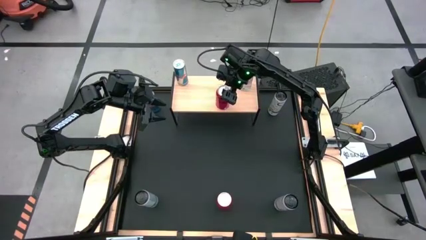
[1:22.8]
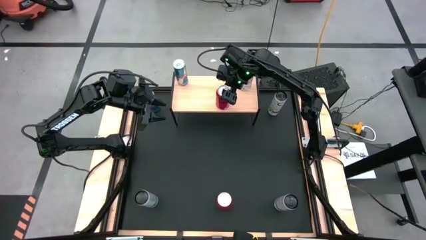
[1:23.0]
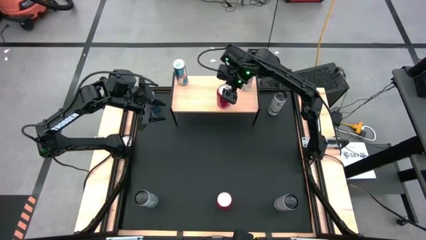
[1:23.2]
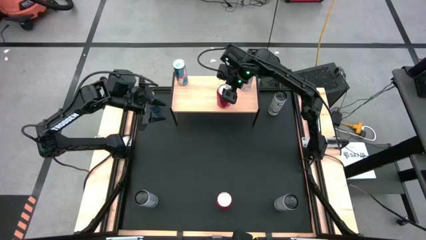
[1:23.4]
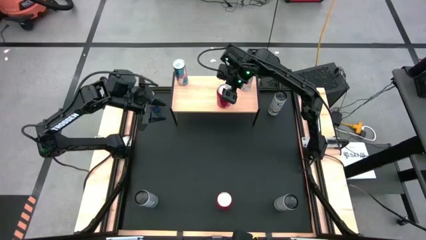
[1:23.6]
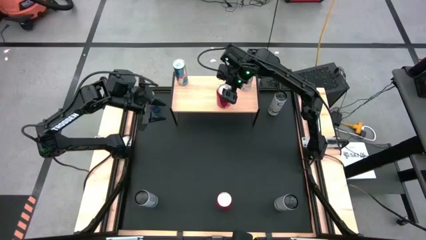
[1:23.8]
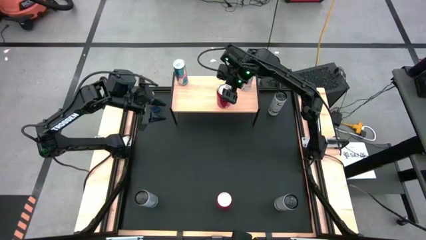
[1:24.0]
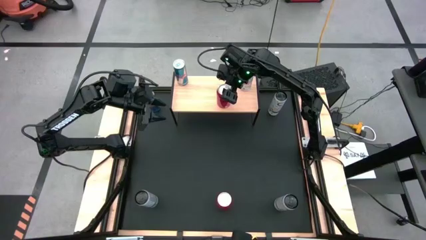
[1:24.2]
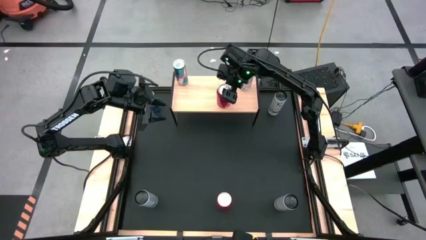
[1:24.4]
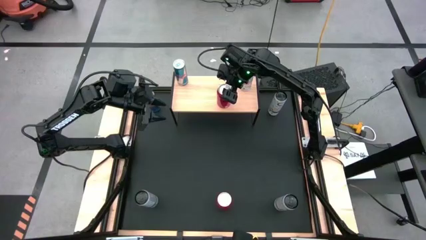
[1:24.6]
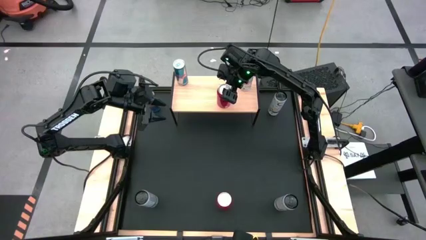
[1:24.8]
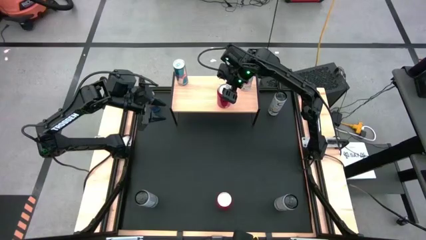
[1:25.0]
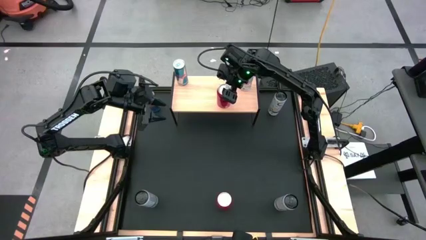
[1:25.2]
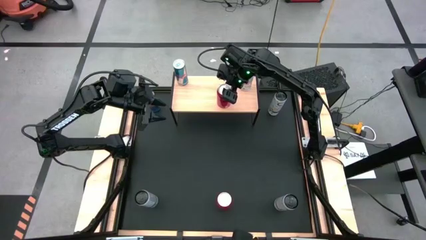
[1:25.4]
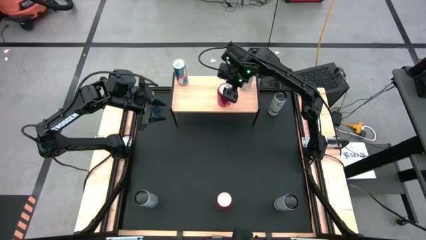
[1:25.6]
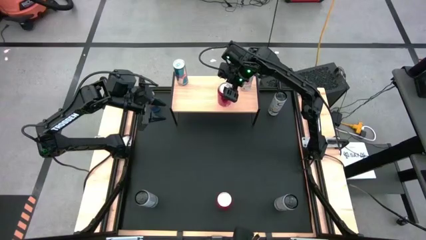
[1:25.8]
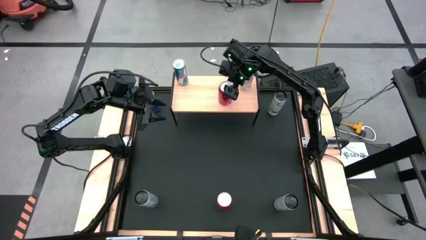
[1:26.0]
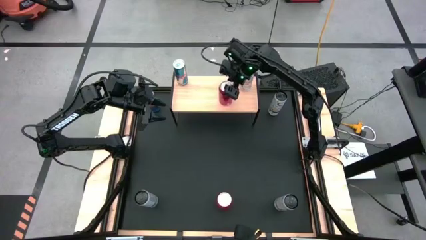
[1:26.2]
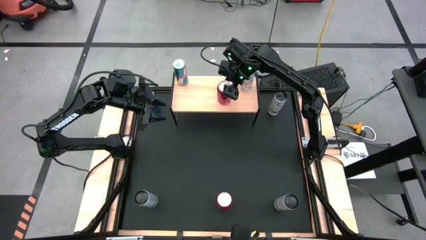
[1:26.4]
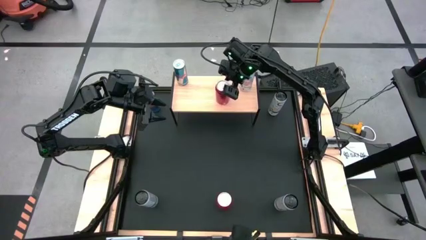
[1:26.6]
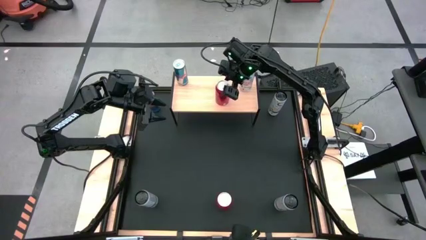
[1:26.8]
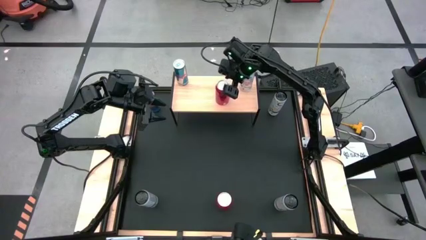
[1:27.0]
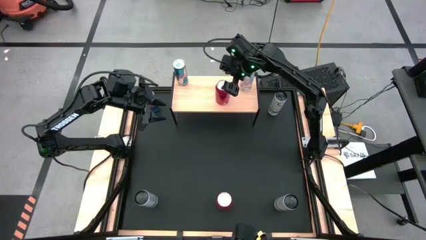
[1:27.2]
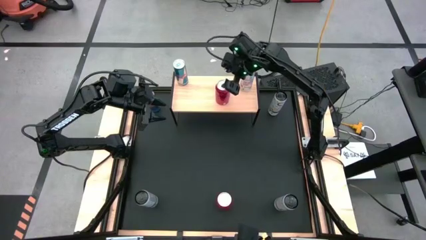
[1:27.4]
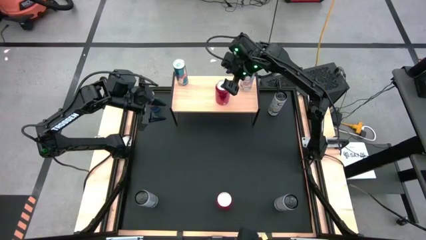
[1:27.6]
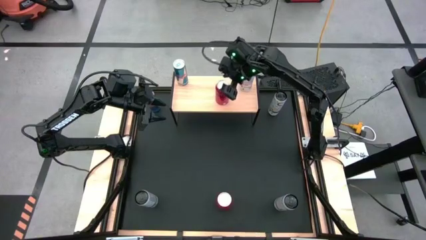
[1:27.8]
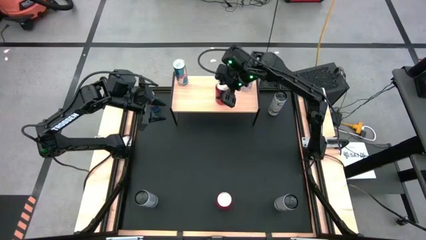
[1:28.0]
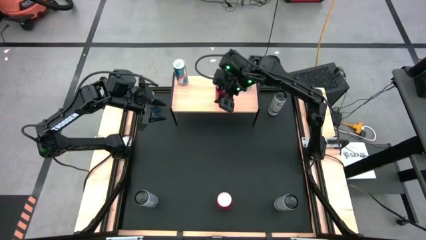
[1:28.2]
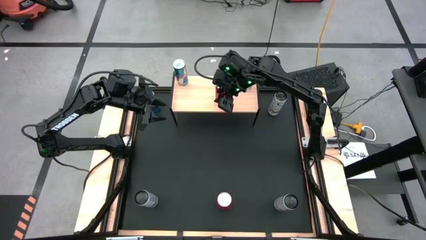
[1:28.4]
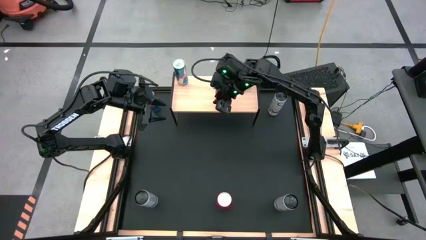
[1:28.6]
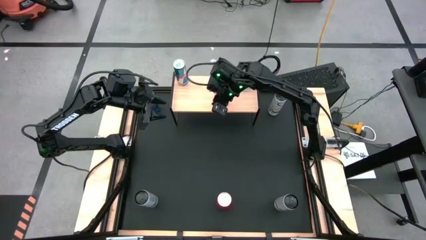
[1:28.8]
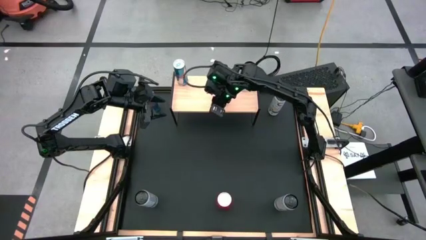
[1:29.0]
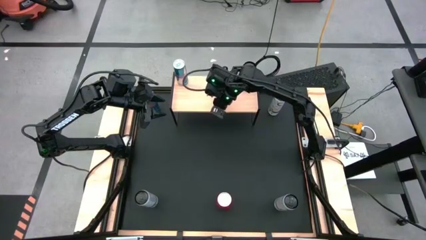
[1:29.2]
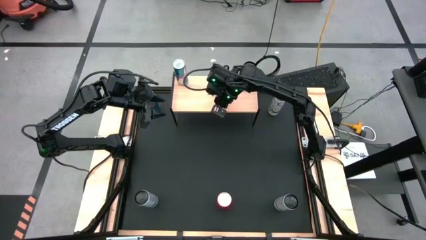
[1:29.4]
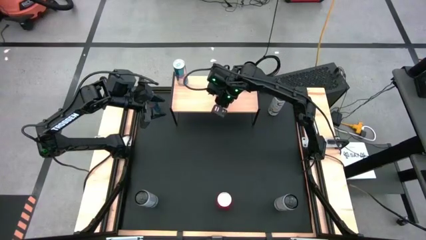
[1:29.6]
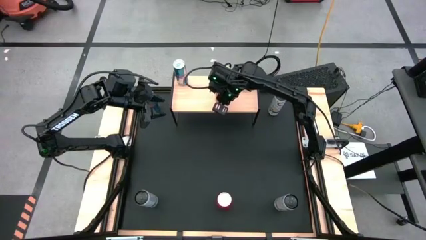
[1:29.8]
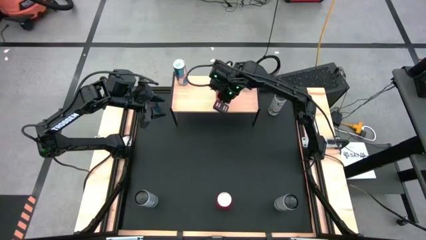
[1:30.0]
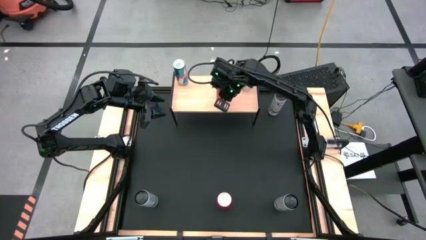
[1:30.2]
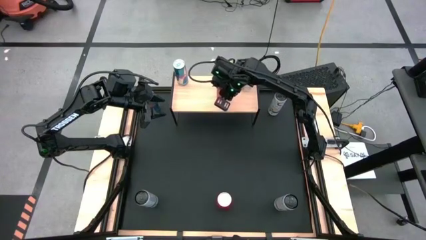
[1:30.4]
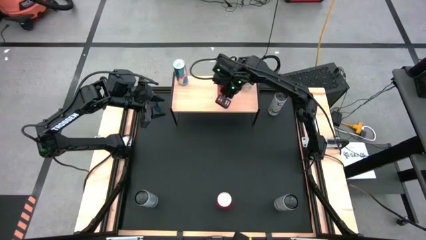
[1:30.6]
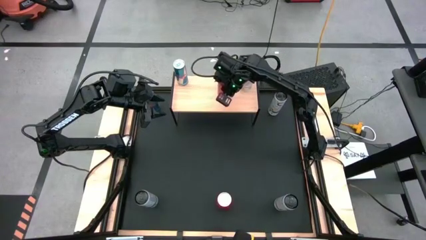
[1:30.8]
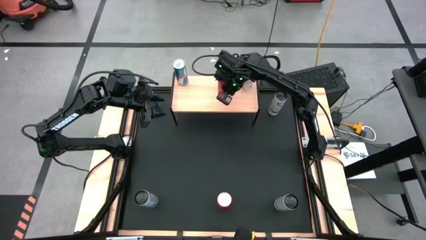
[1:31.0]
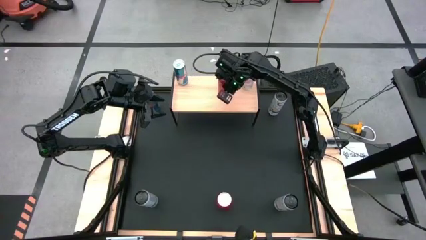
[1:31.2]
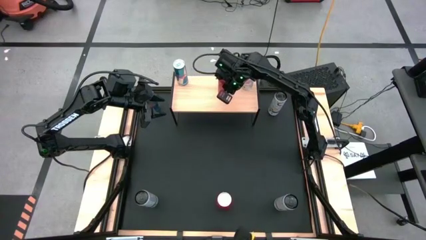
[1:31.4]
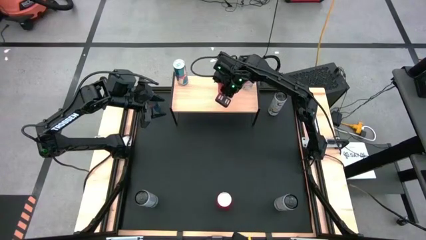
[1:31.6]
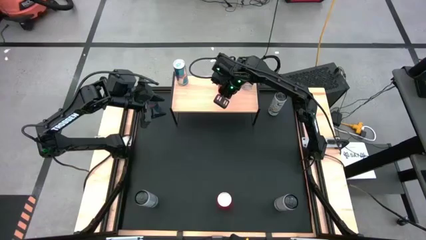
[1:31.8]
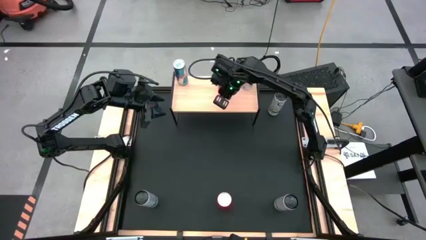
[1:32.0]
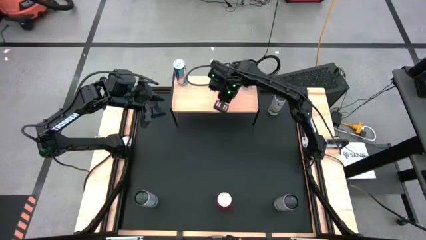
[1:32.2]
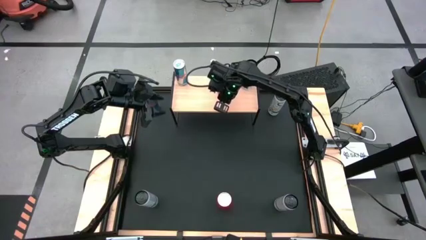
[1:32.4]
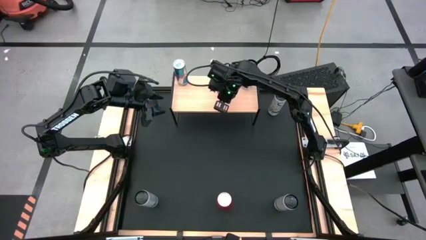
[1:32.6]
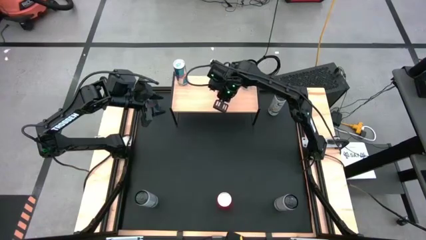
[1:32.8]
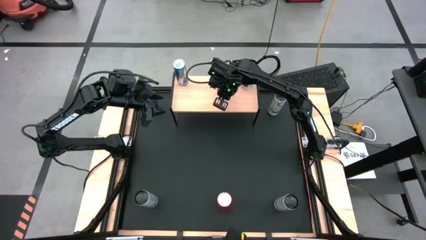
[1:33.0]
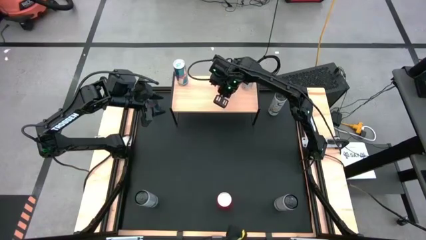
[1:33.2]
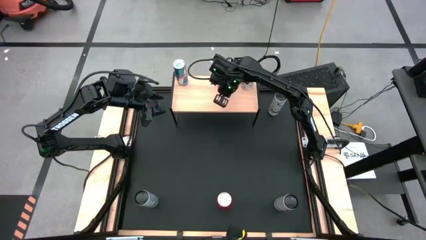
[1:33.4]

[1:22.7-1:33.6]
Task: Place canned beverage on shelf
Put the top red black soda can on the shelf
